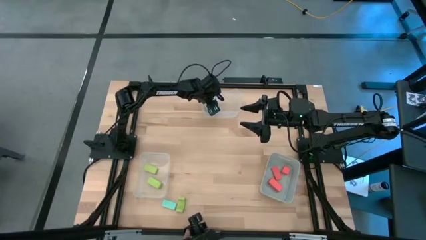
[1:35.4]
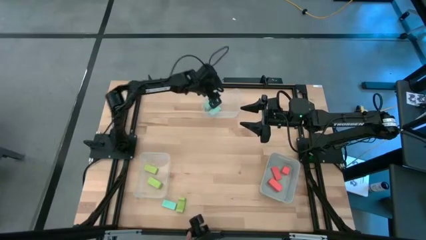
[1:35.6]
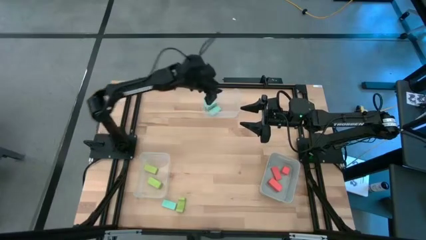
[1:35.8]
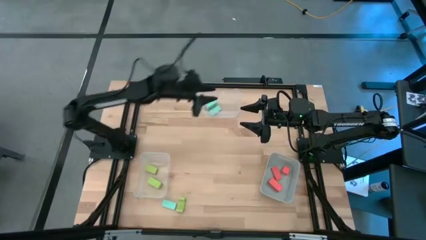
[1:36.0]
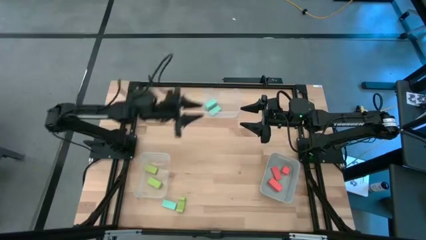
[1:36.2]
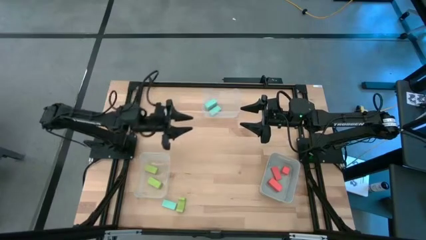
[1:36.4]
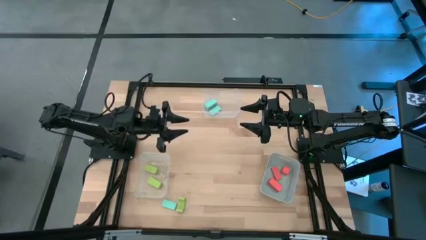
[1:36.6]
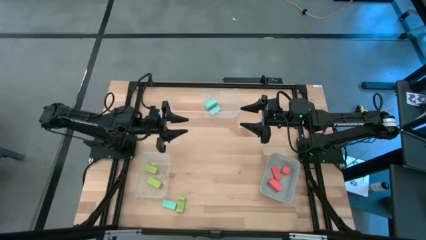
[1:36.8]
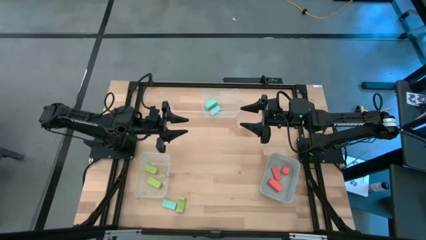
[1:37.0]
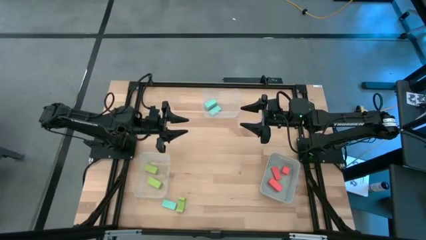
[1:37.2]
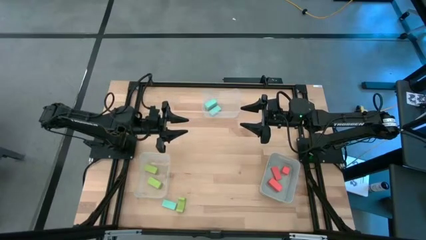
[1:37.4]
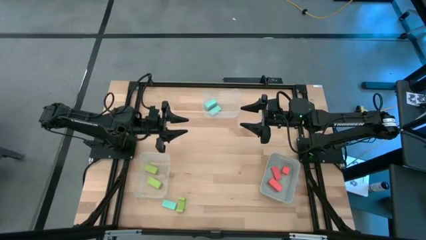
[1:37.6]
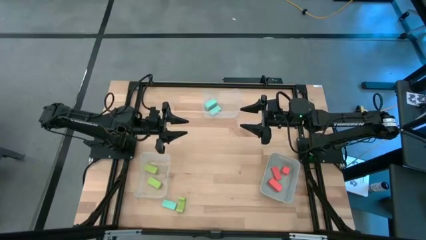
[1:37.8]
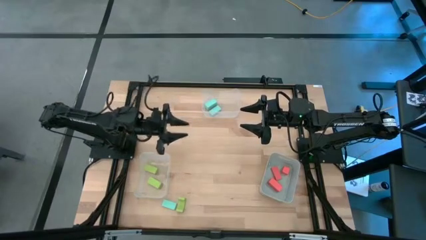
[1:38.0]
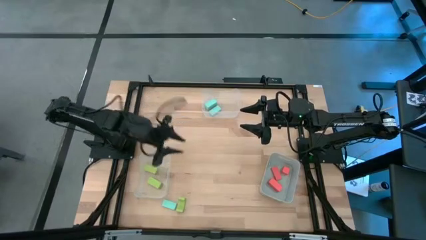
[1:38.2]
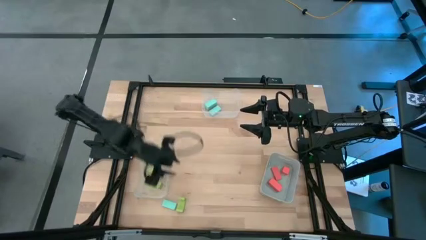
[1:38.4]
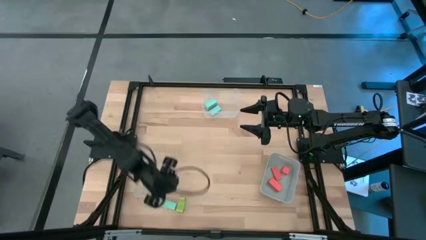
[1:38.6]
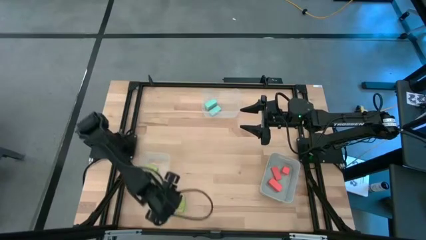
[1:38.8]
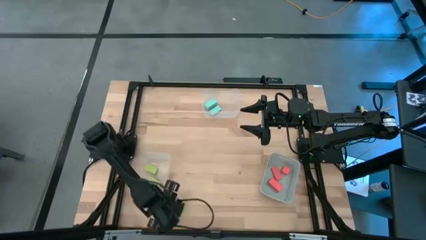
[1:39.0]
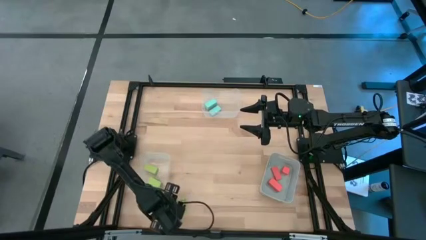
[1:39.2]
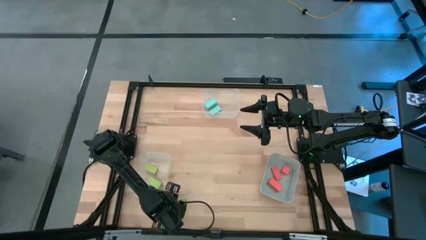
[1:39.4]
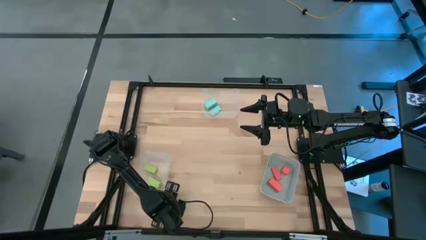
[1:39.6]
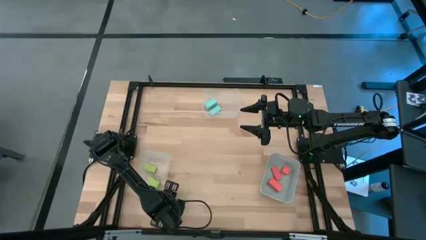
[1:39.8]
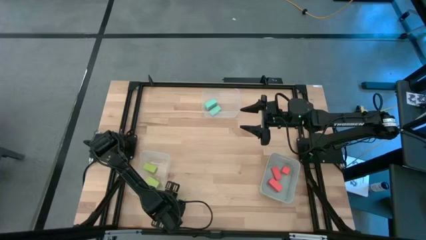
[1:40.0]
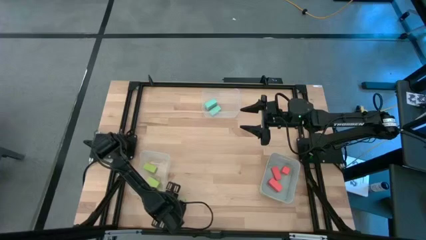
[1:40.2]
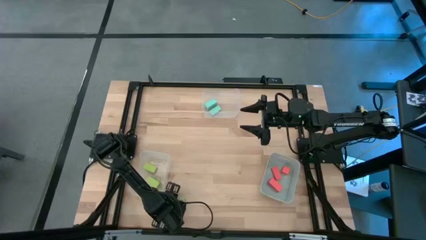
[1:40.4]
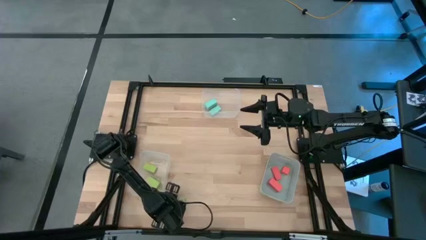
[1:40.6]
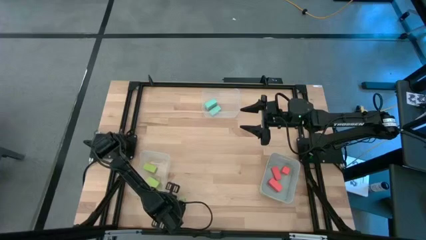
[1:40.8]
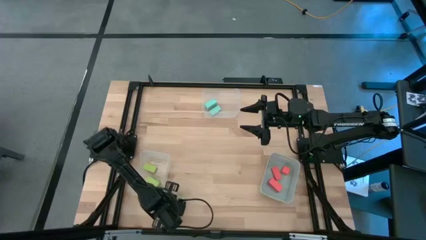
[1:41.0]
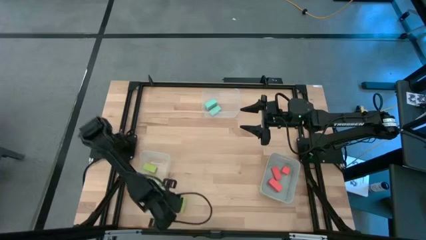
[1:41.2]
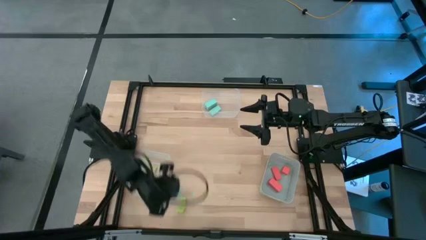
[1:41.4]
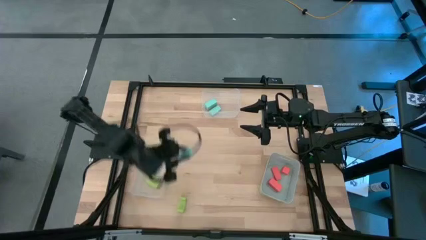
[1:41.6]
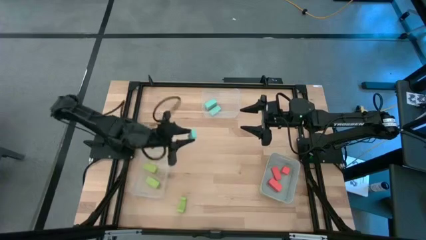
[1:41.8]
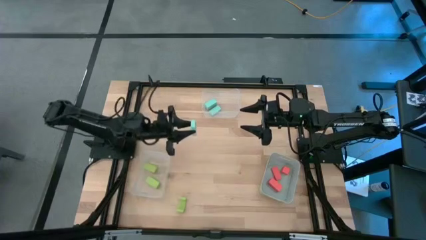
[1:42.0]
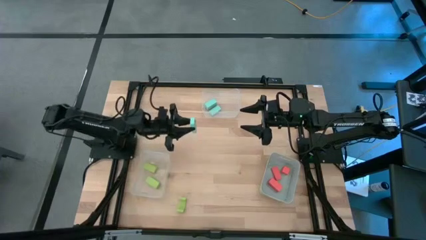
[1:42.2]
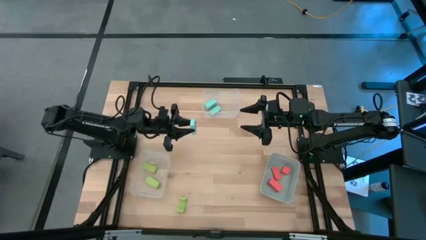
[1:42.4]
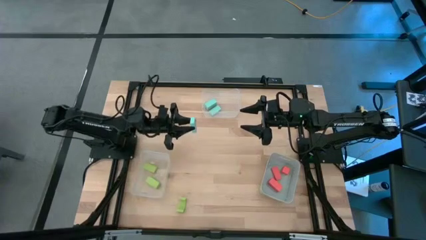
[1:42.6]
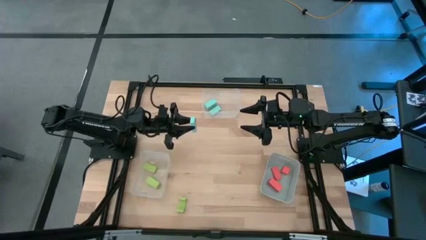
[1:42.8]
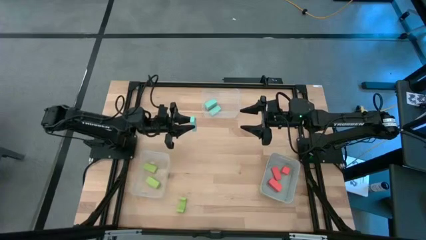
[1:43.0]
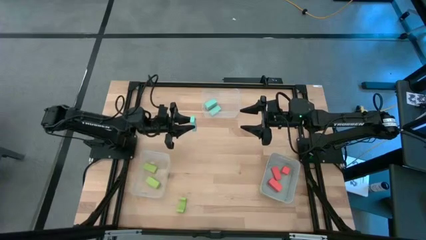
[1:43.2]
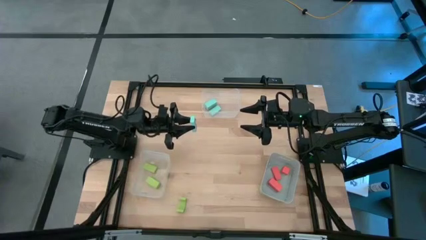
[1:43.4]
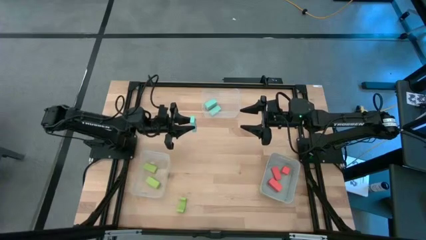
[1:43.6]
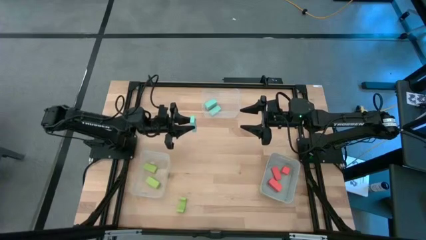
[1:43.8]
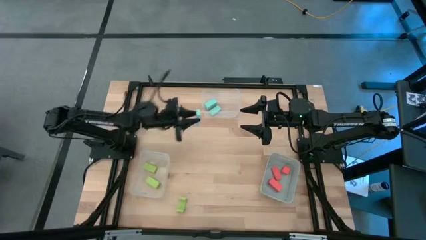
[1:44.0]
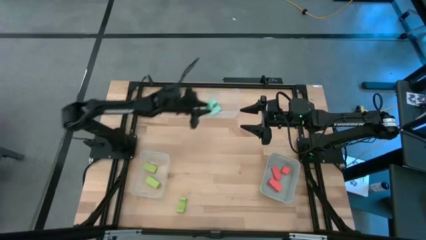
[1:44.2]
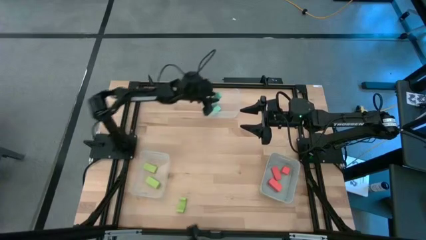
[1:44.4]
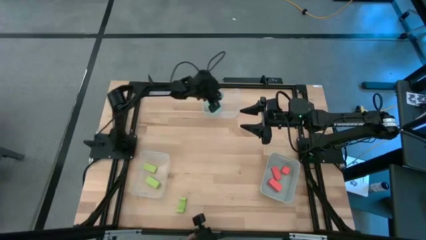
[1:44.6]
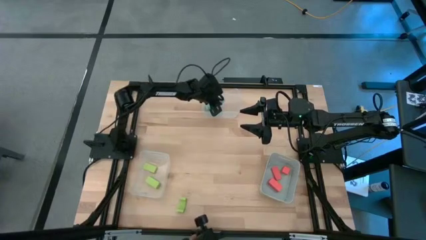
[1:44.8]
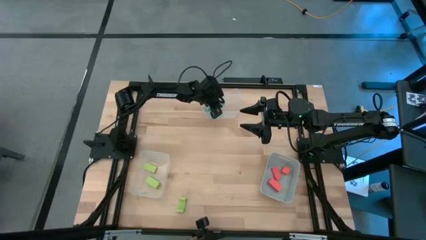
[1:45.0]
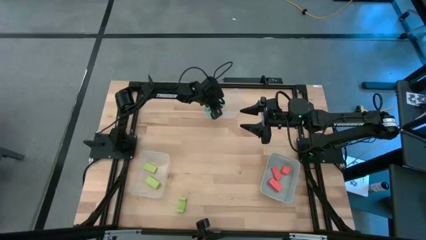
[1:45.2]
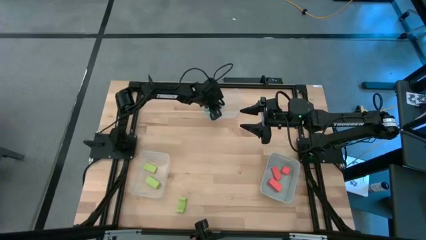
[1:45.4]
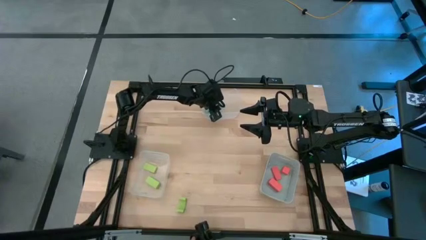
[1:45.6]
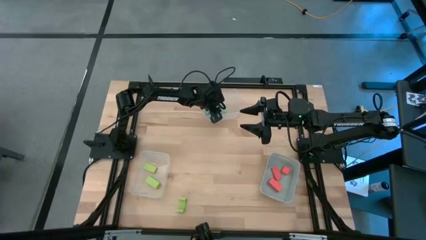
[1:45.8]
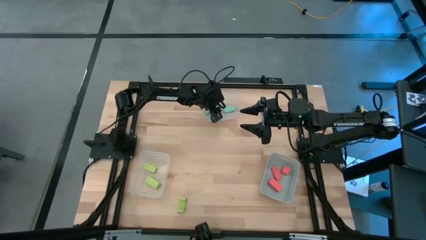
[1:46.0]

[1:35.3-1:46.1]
Task: Sort & place blocks by color
Put the blue block into the top transparent bin
